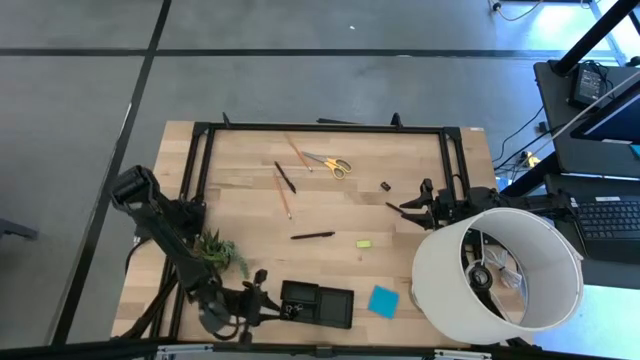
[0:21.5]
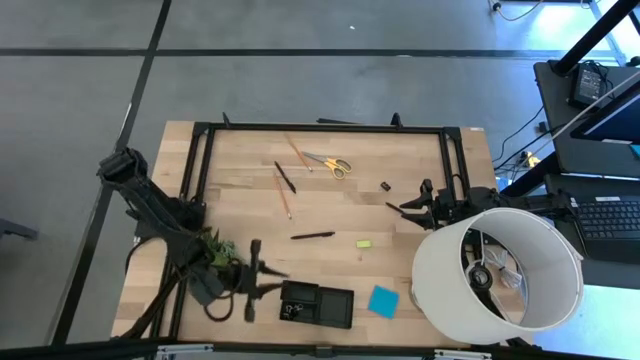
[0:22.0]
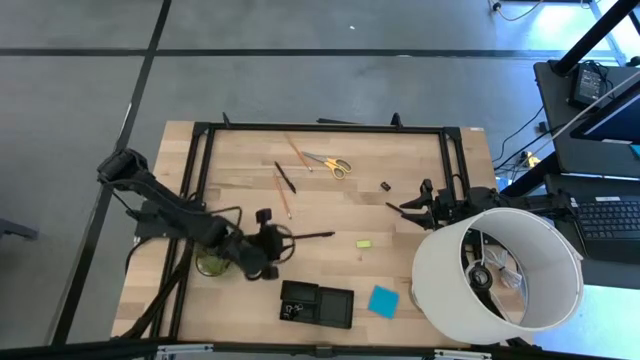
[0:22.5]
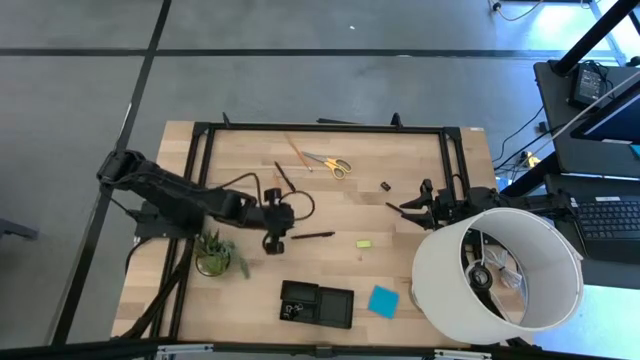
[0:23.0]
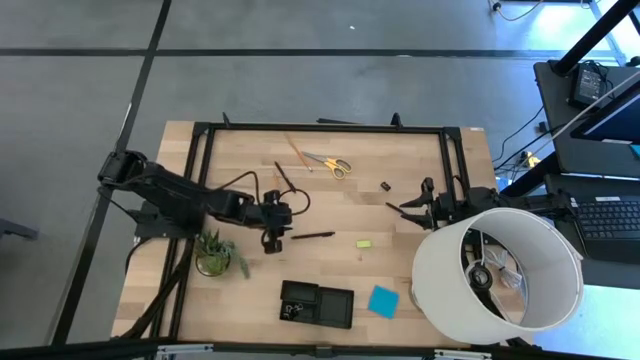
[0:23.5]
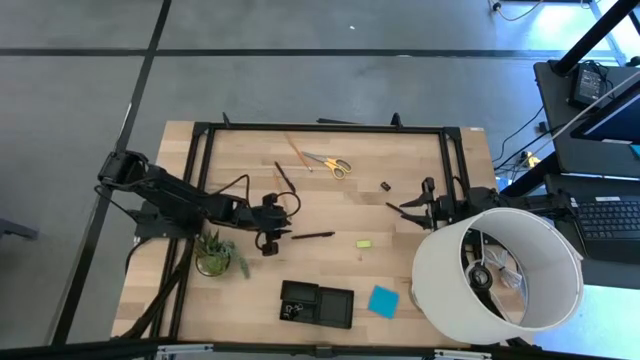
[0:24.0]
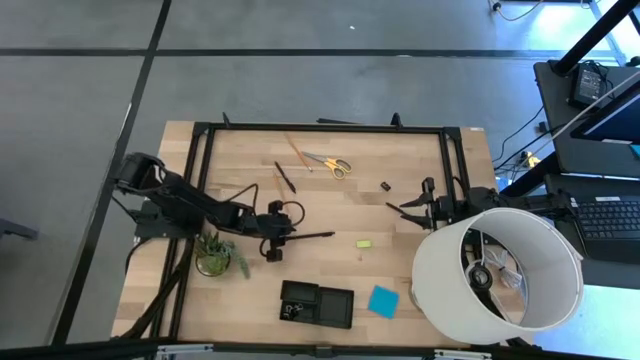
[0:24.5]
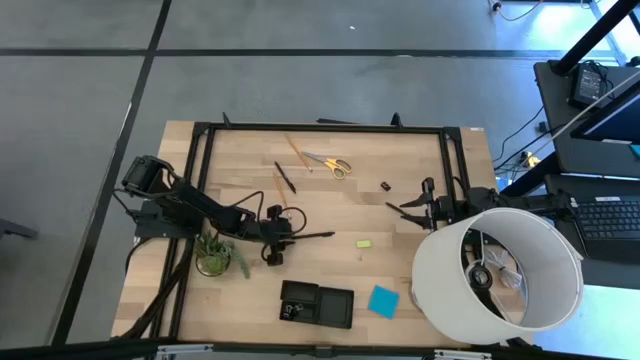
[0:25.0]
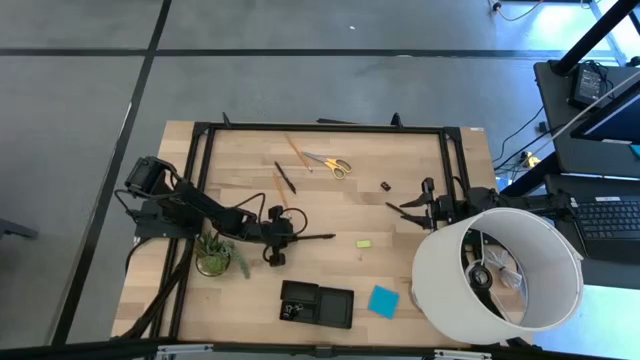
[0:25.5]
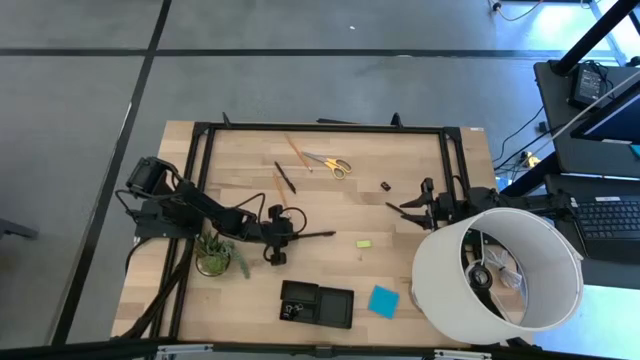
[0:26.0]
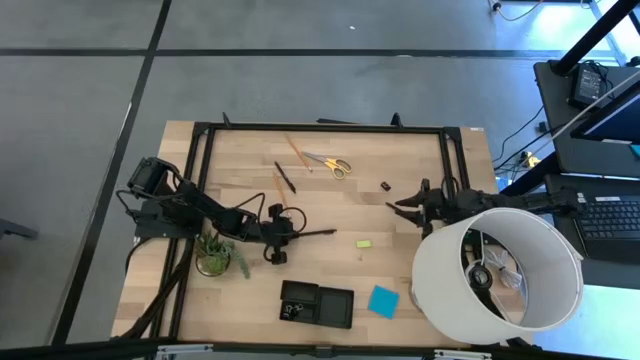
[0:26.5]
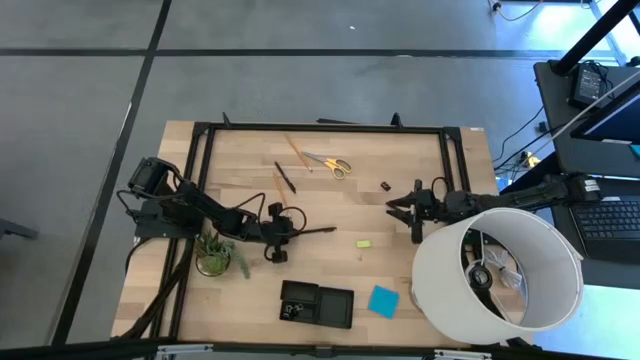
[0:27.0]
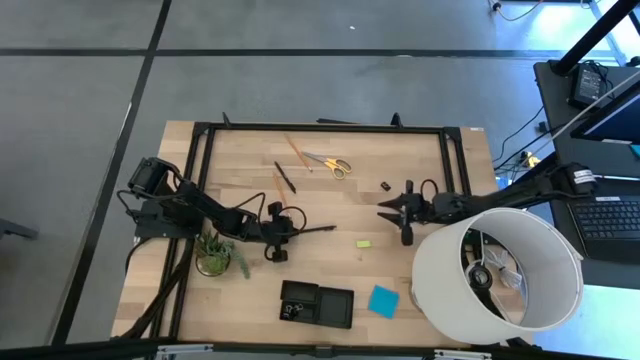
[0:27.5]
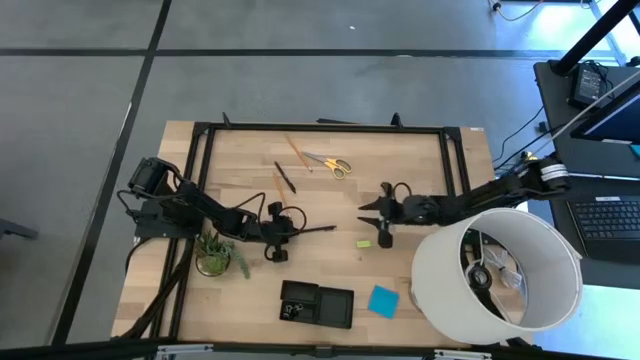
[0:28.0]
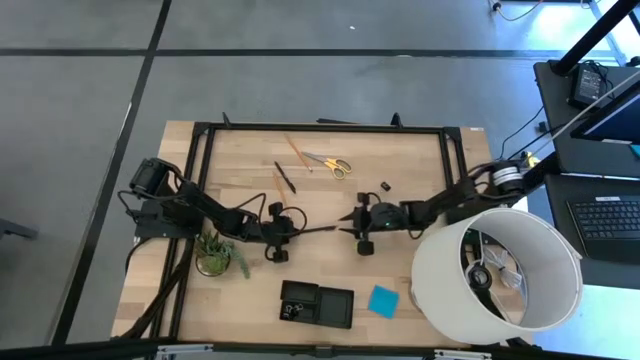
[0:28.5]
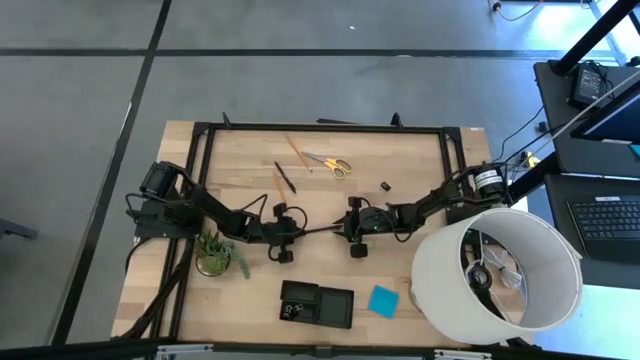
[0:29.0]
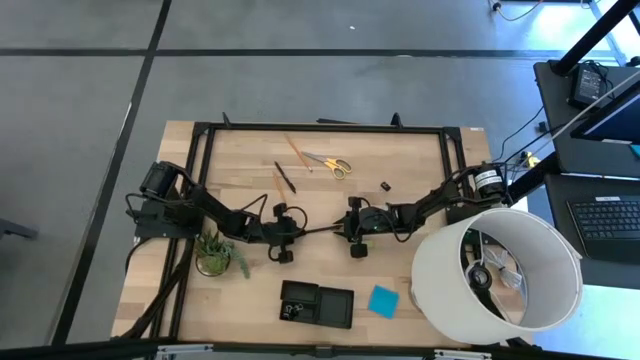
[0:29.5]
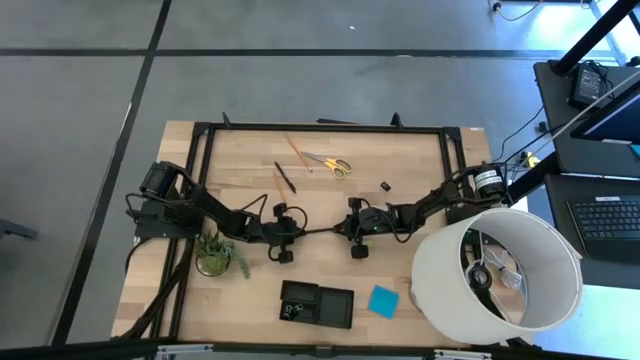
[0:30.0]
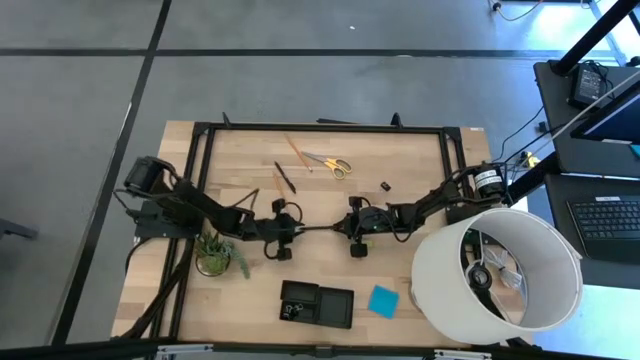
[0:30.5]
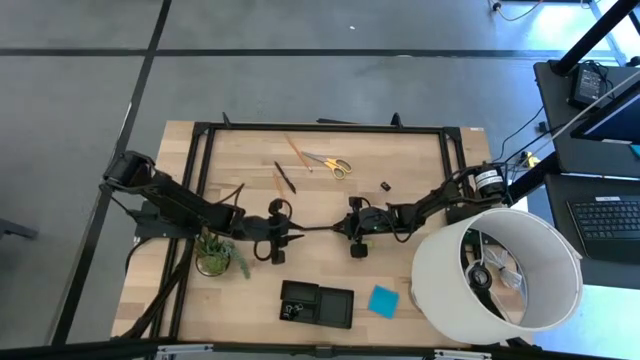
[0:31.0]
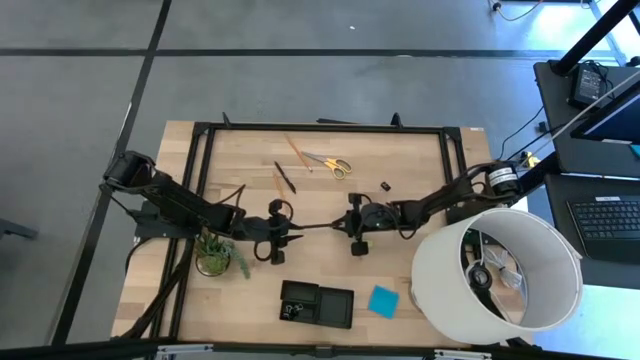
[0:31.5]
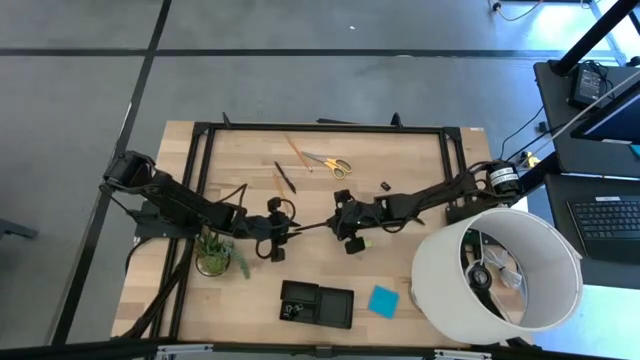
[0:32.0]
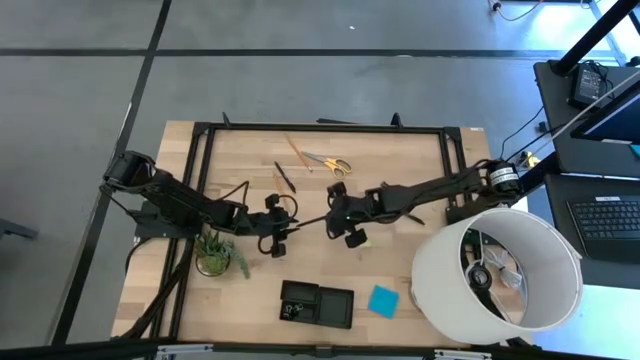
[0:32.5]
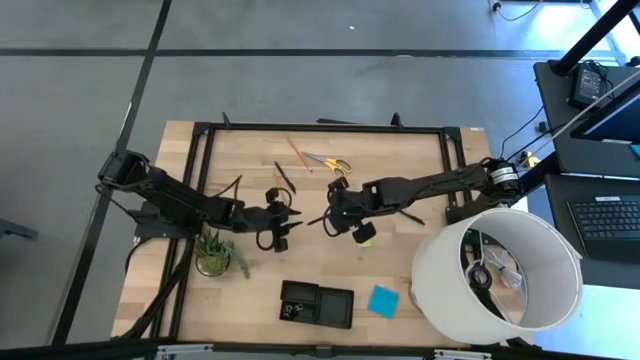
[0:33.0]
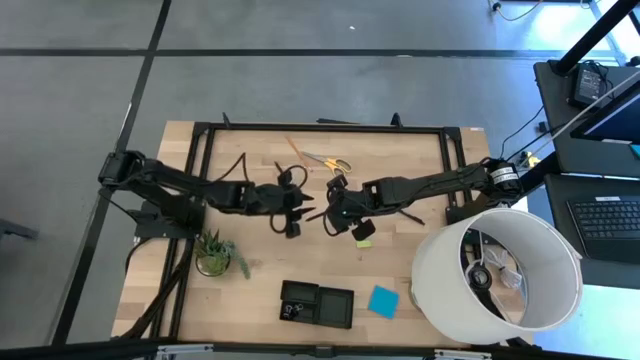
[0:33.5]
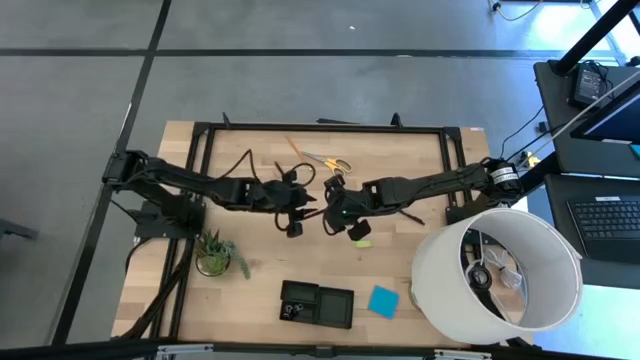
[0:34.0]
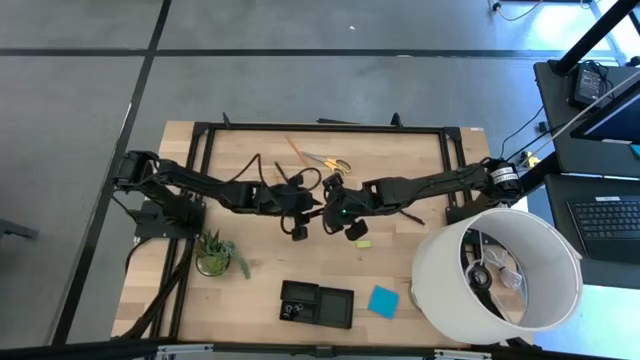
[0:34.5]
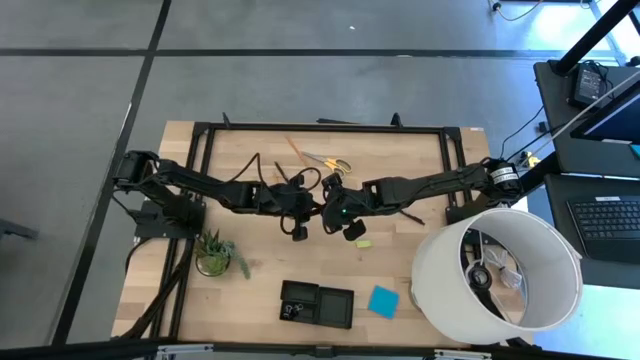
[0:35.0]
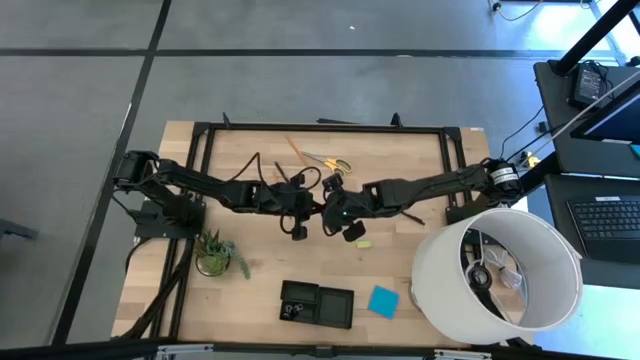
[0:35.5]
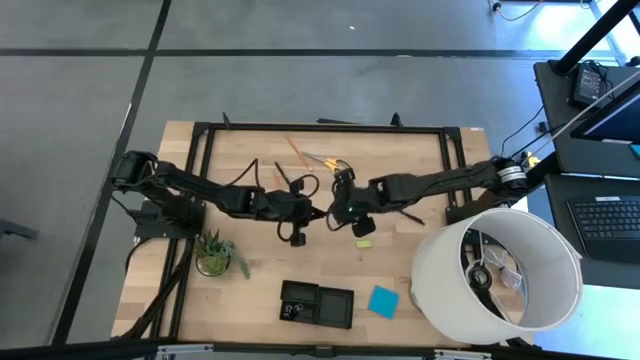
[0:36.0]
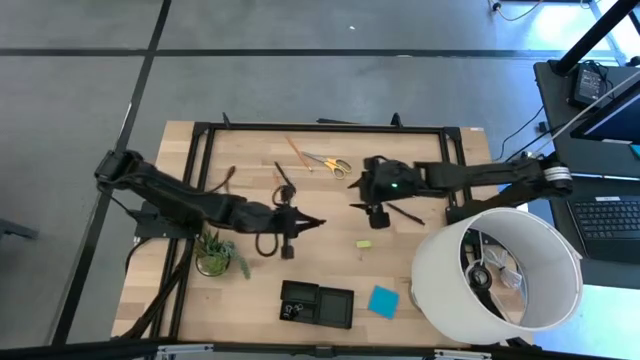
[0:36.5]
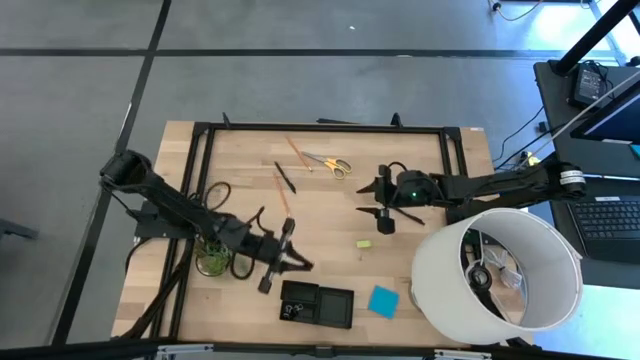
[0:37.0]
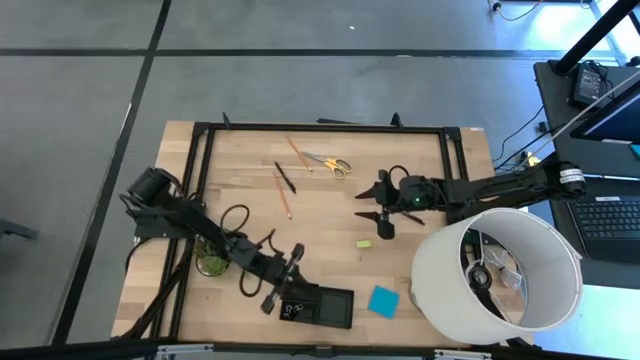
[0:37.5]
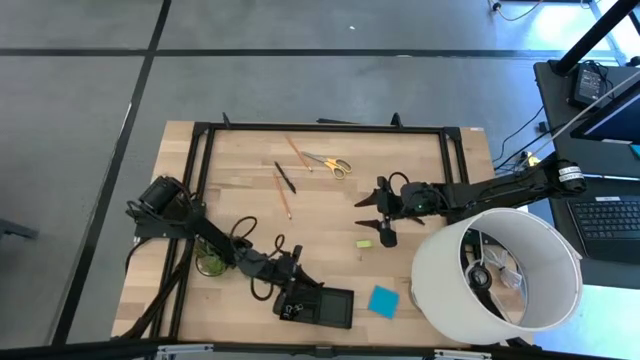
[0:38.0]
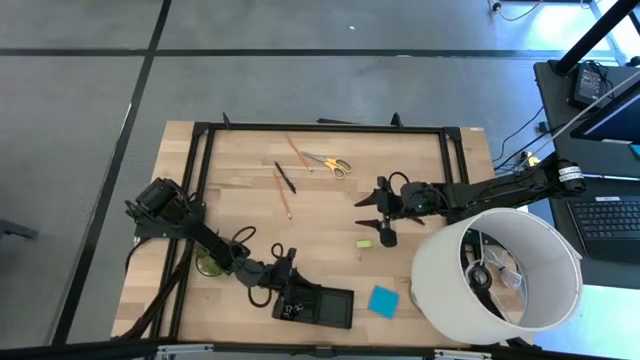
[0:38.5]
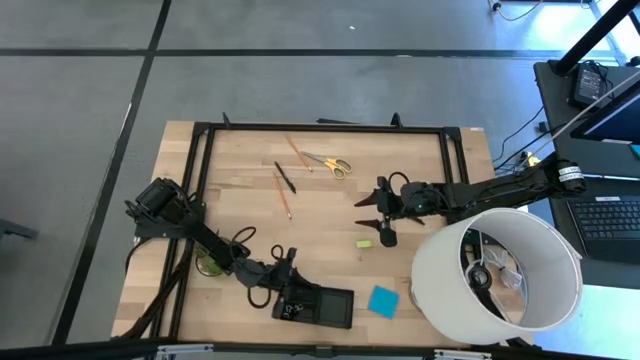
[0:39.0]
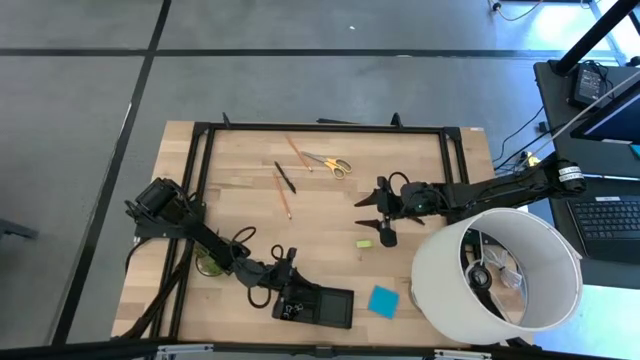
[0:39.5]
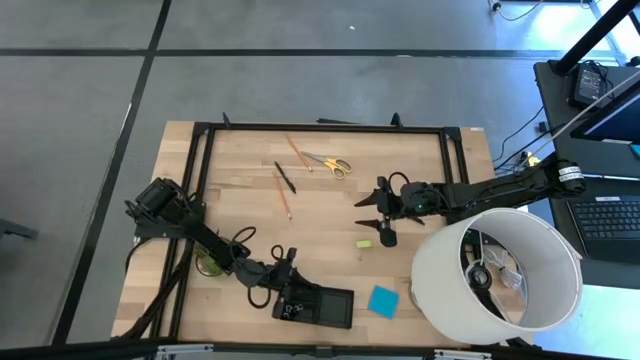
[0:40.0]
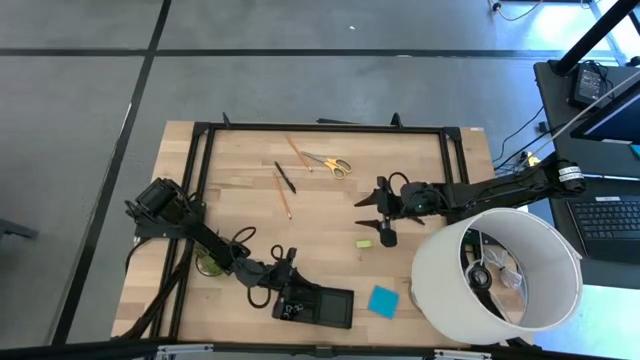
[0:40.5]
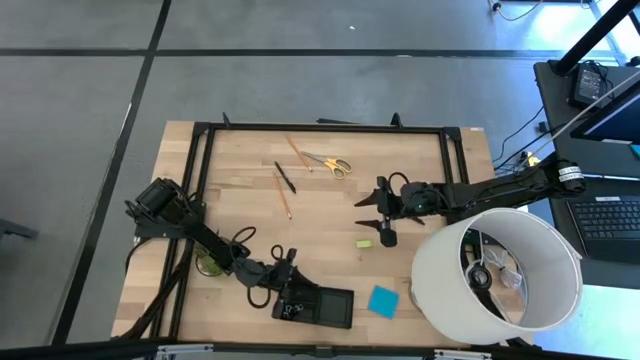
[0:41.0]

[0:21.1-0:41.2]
Task: Pick and place office supplies into organizer
Put the bottom black pen into the black desk organizer
